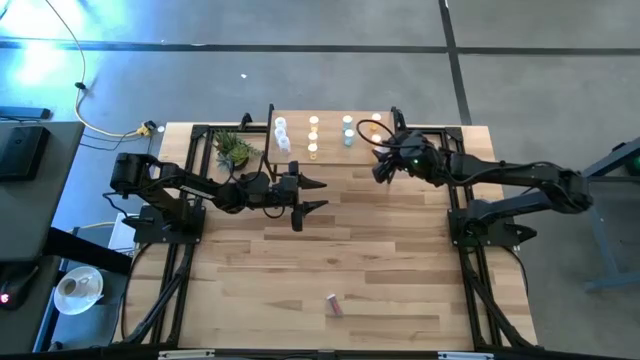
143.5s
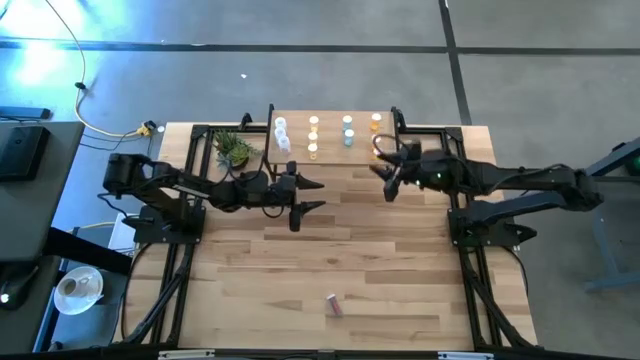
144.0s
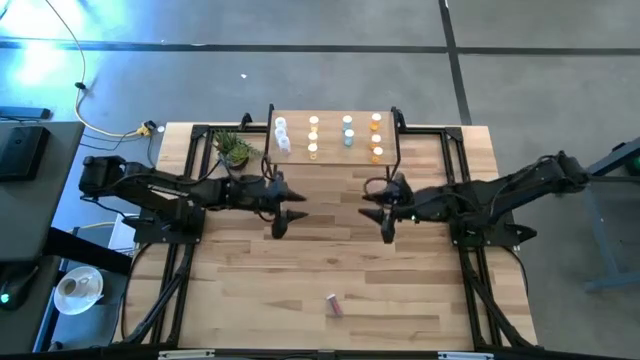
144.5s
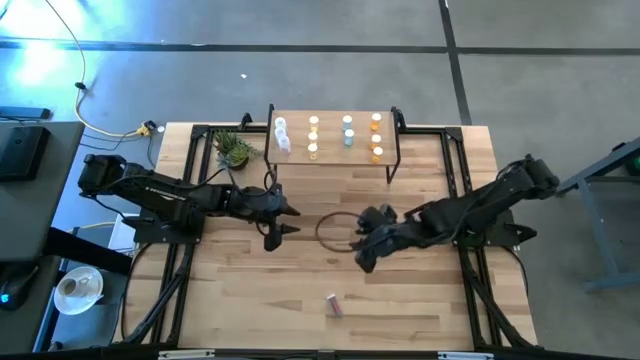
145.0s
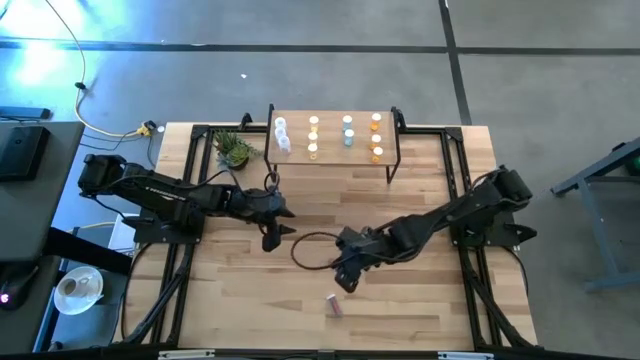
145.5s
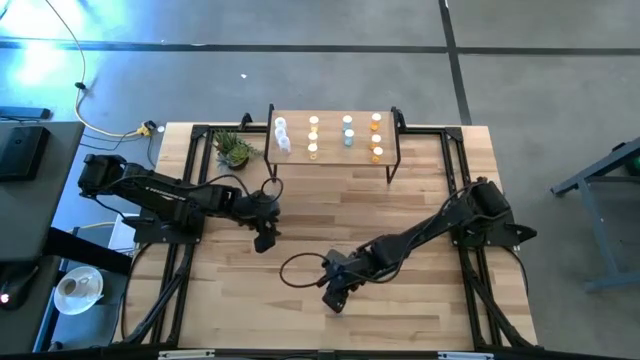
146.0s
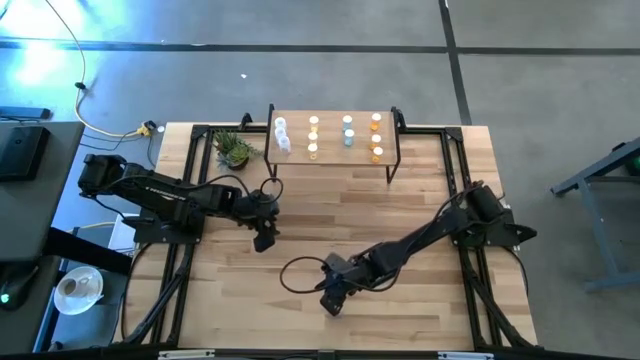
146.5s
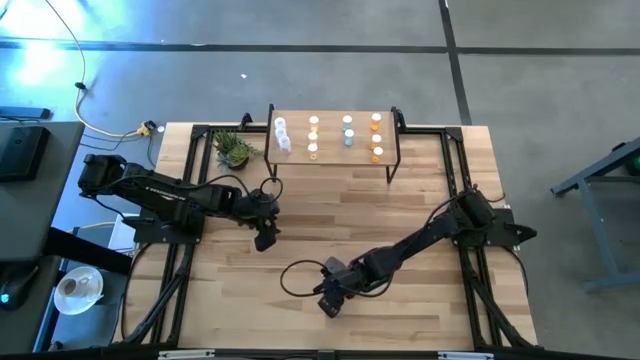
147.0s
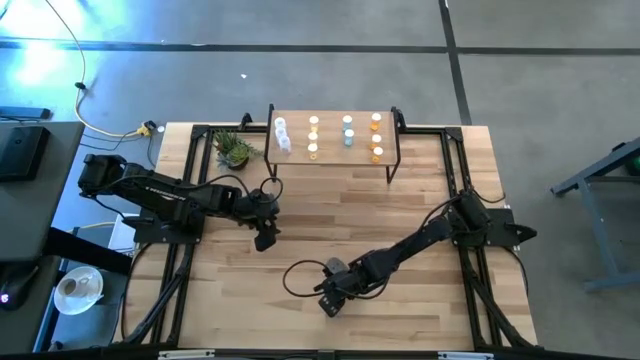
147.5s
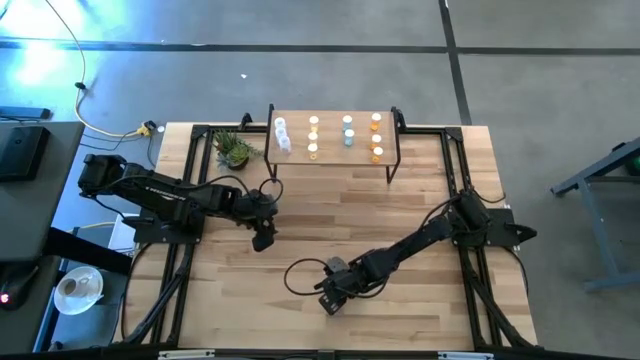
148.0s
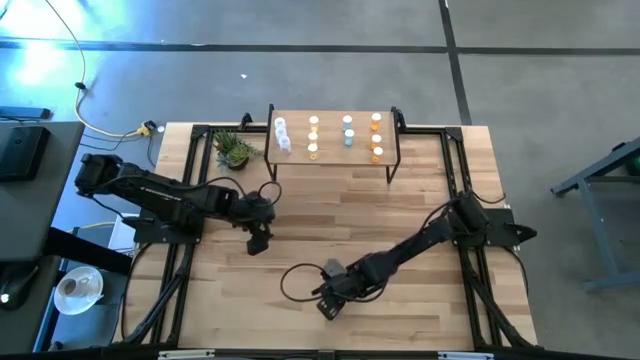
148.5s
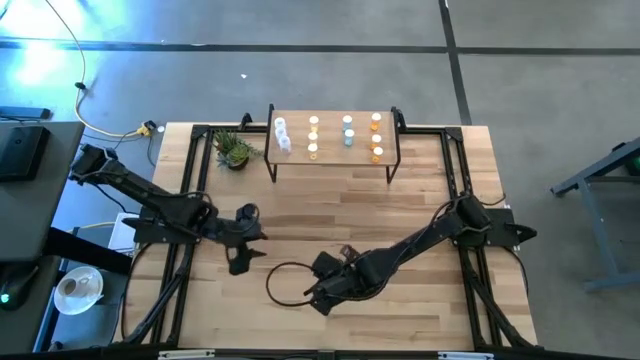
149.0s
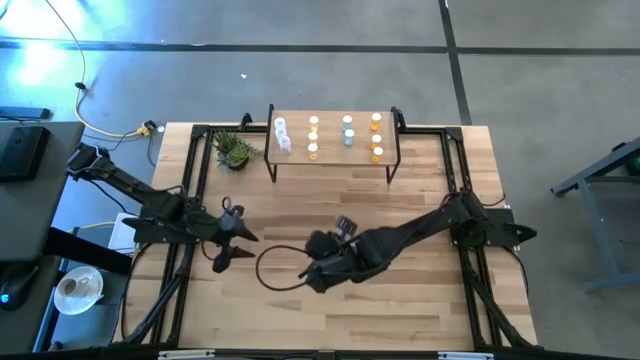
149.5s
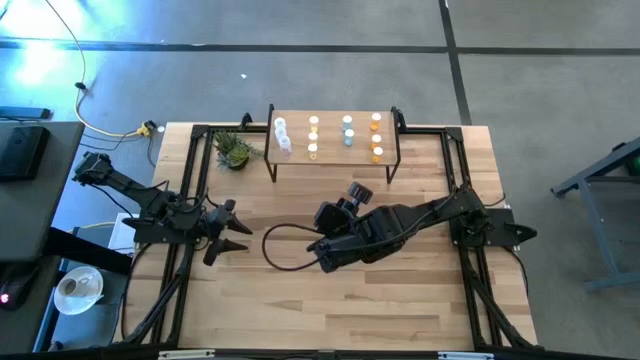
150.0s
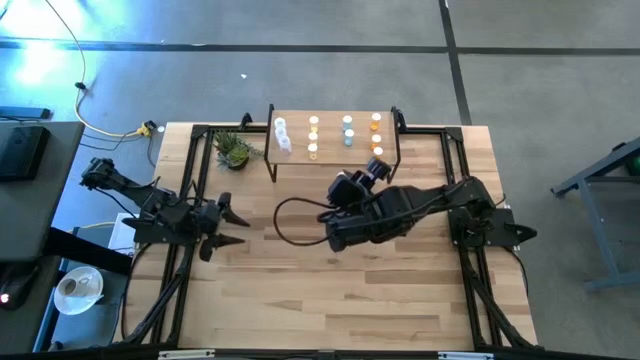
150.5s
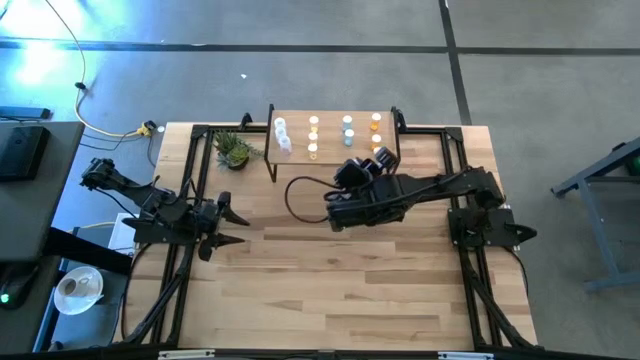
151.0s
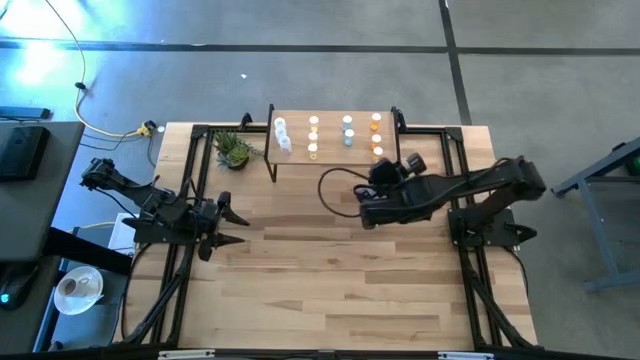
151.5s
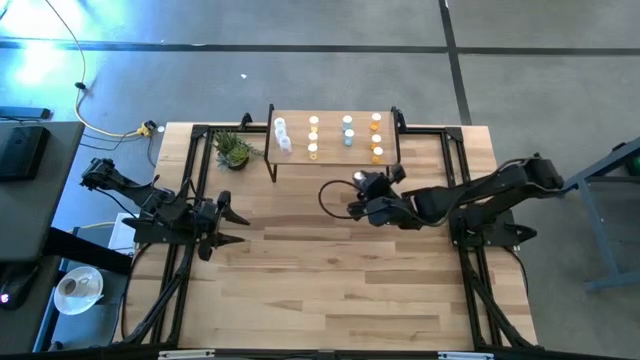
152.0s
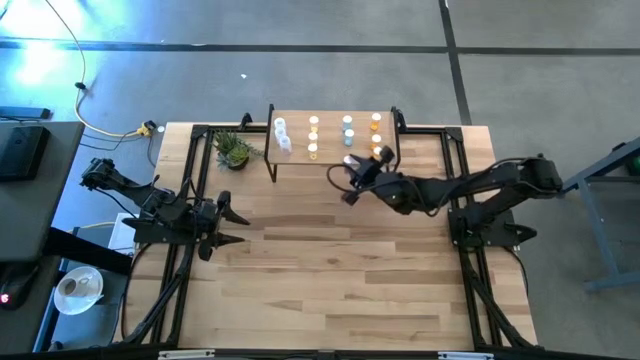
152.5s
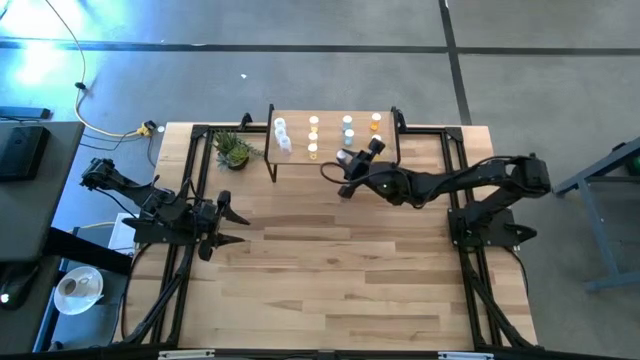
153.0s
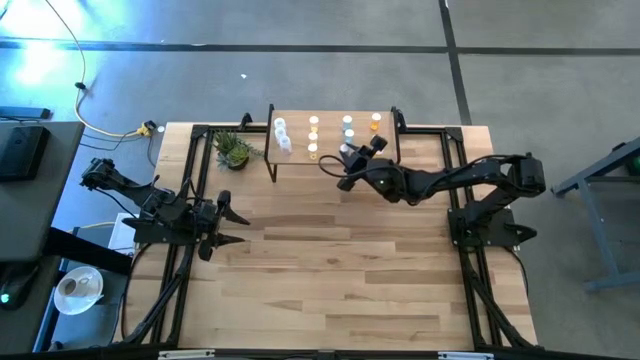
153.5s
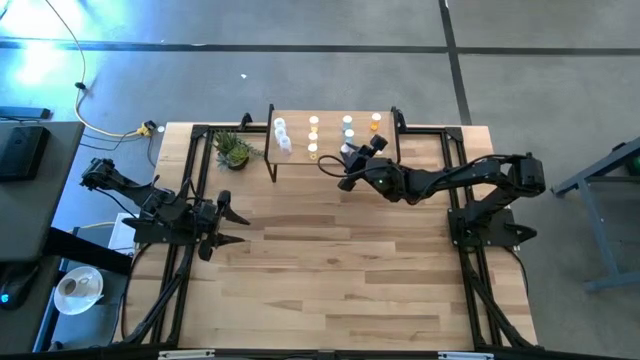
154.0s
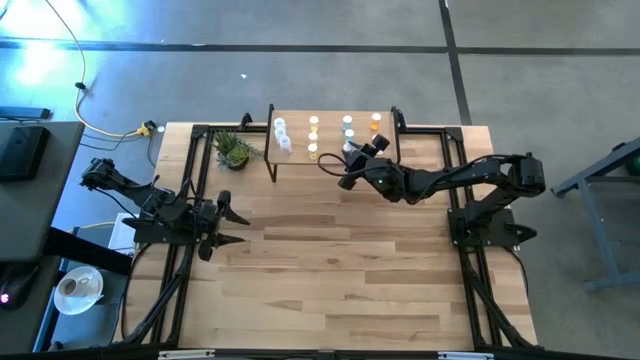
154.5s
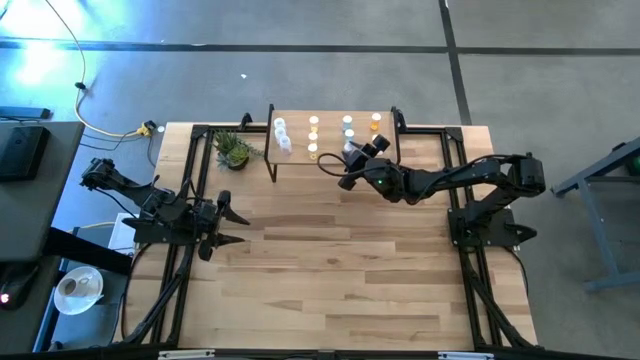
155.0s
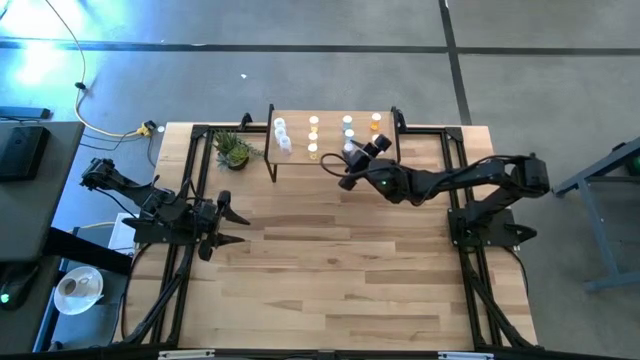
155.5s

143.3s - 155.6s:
Task: Pick and place medicine bottles onto shelf by color
Put the blue pill bottle aligned with the other blue pill bottles on the shelf

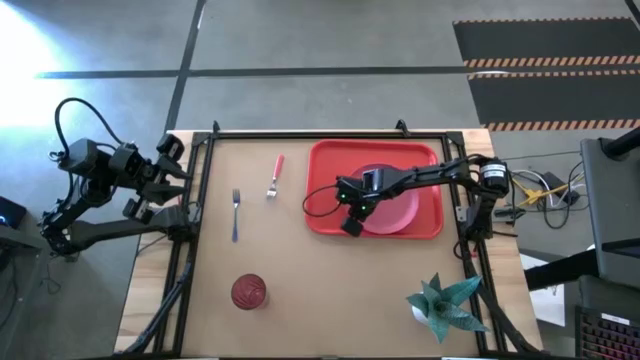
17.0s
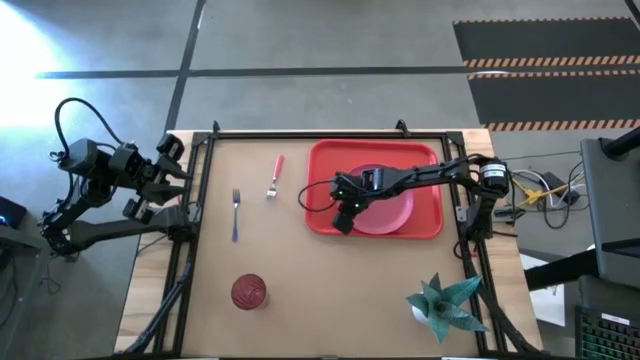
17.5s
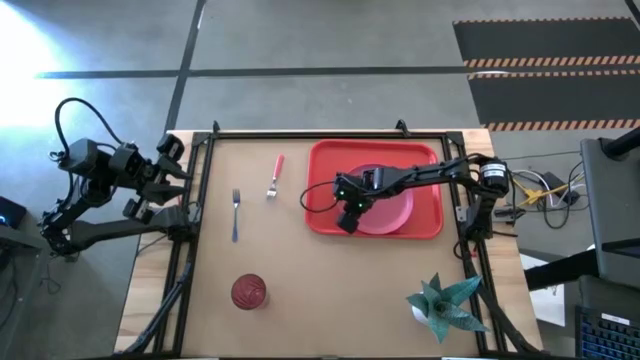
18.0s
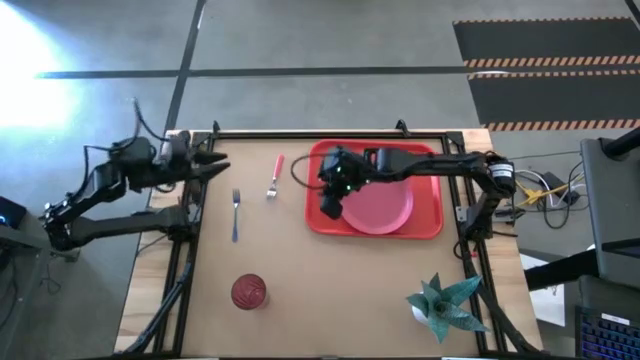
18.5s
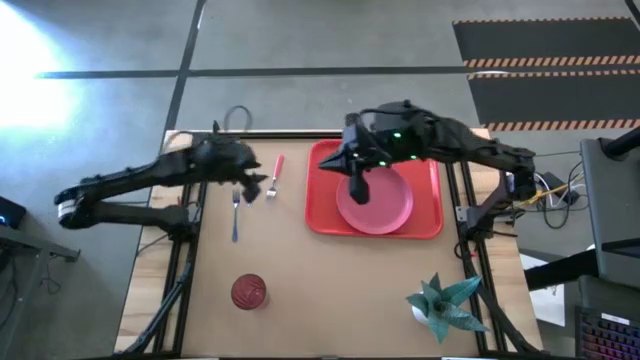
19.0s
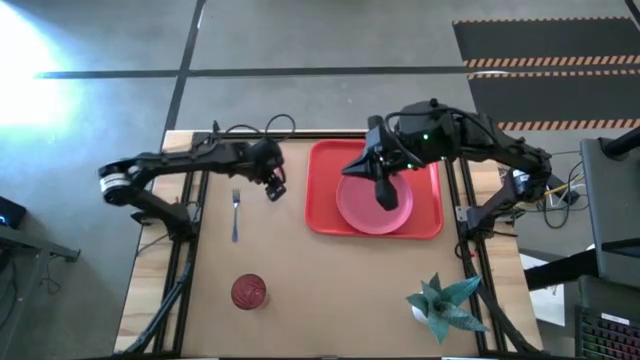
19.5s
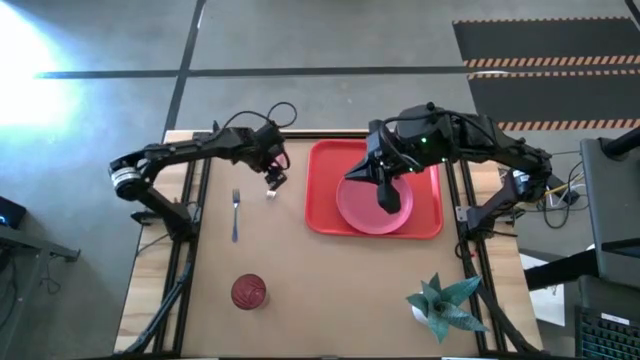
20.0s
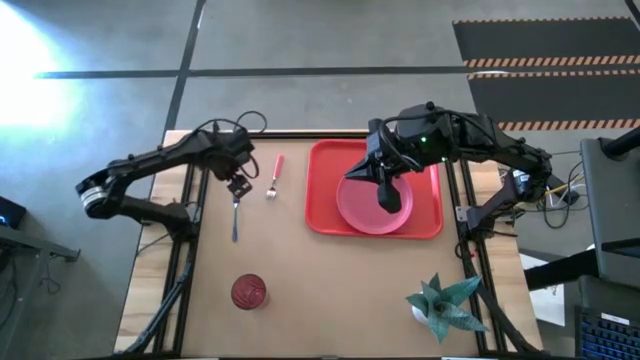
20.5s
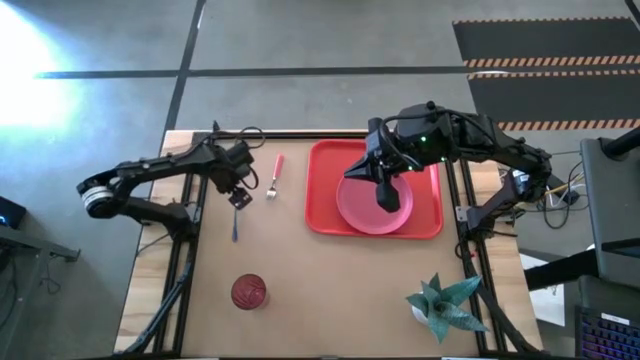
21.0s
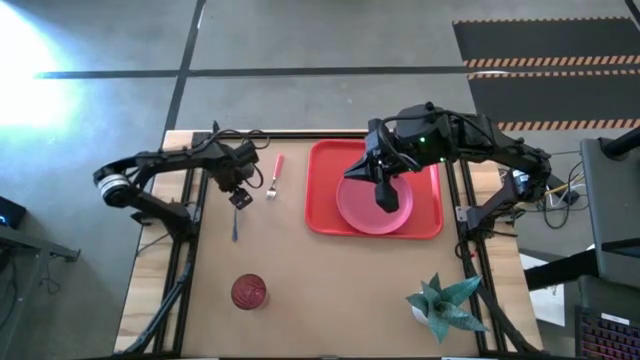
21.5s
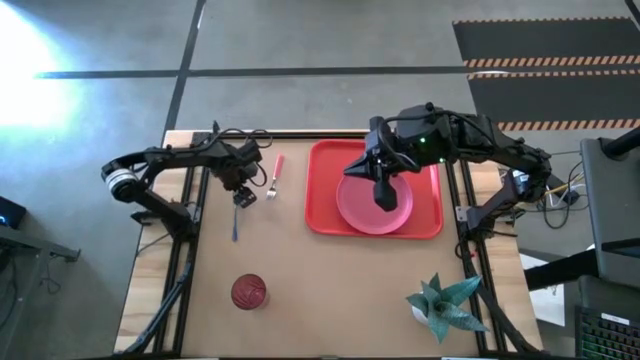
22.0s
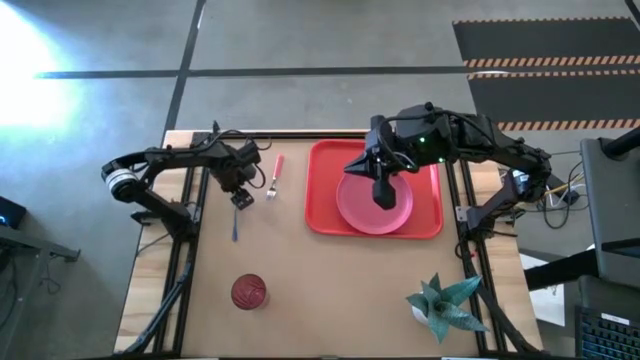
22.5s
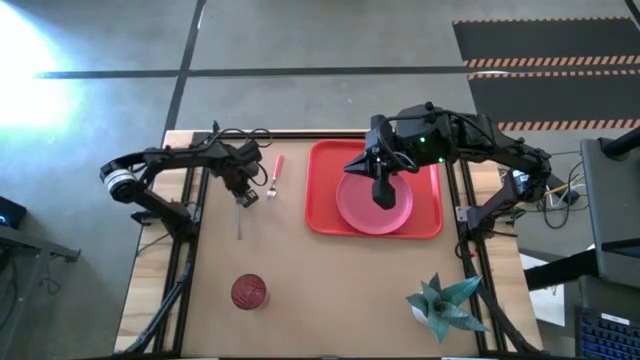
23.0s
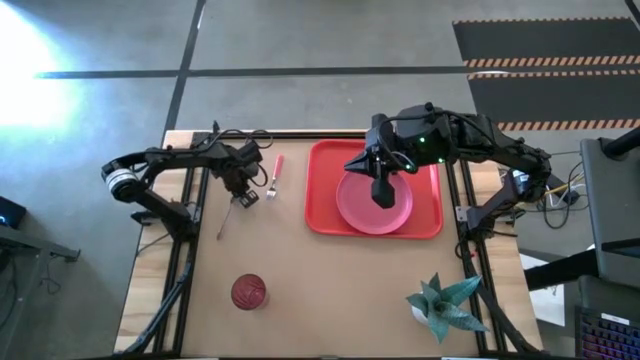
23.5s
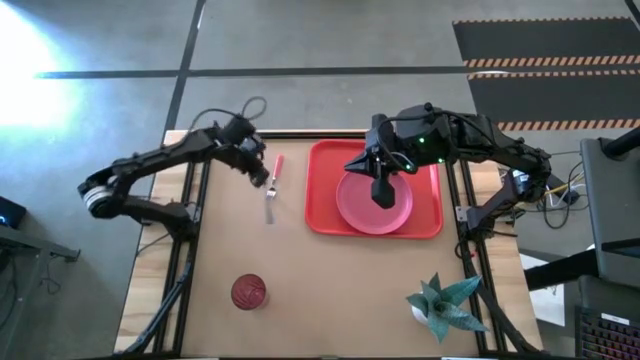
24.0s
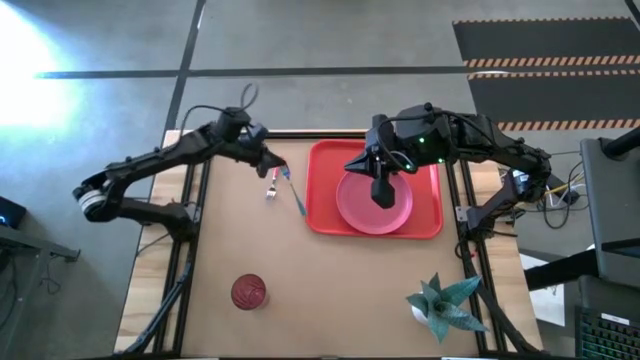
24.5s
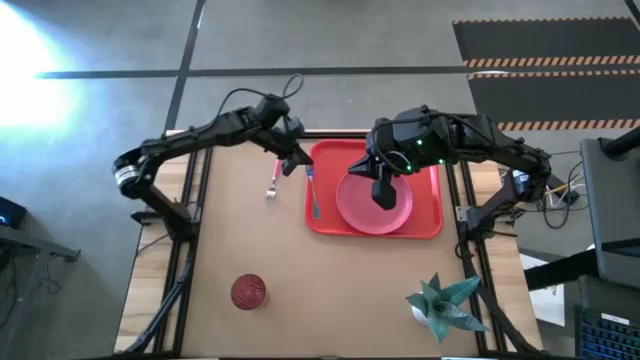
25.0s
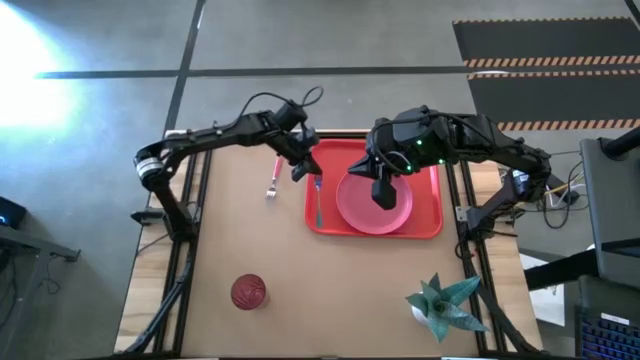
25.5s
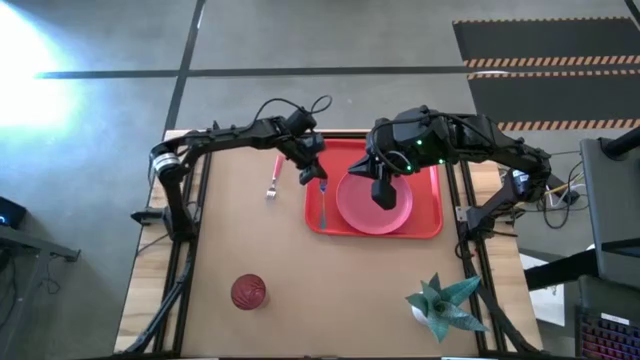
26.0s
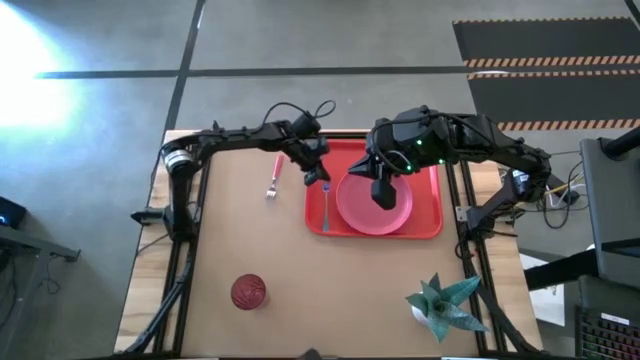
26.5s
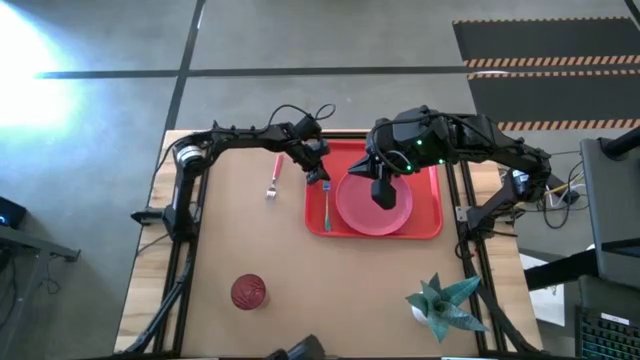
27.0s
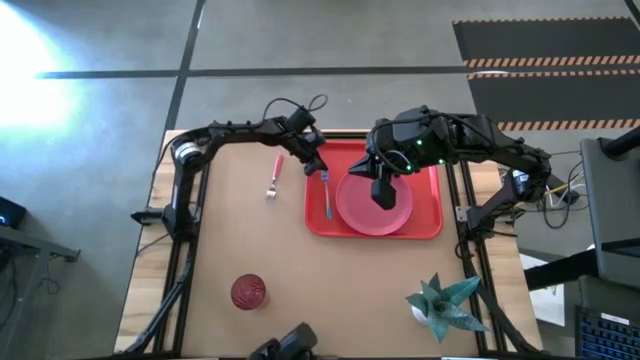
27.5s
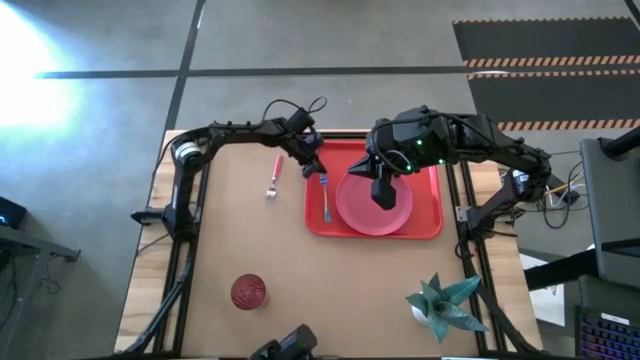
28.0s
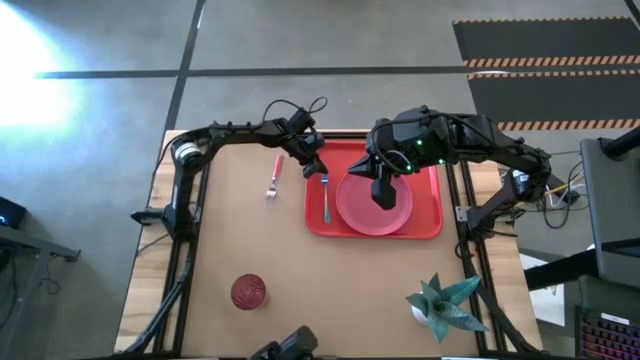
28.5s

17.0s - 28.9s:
Task: Pick and place plate/cup/fork/spoon on tray
Put the blue fork on the red tray to the right of the pink plate
